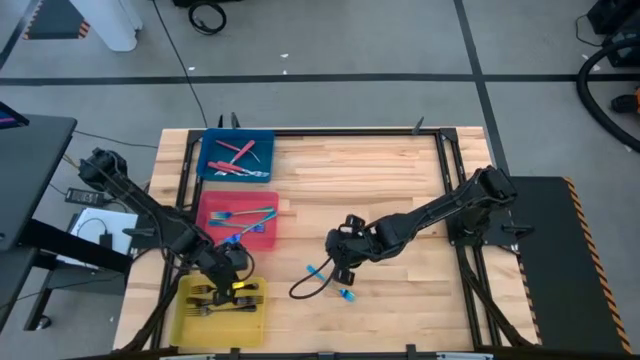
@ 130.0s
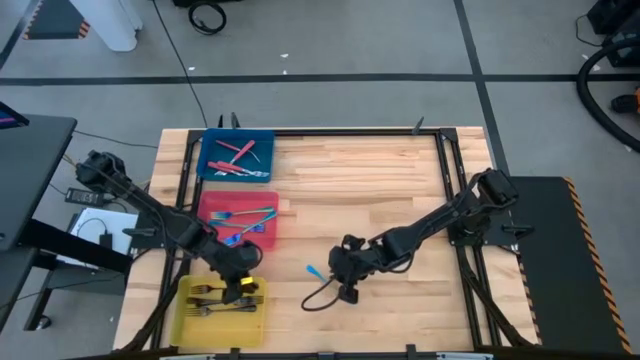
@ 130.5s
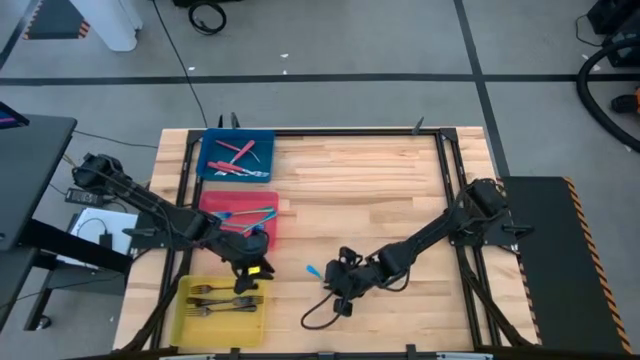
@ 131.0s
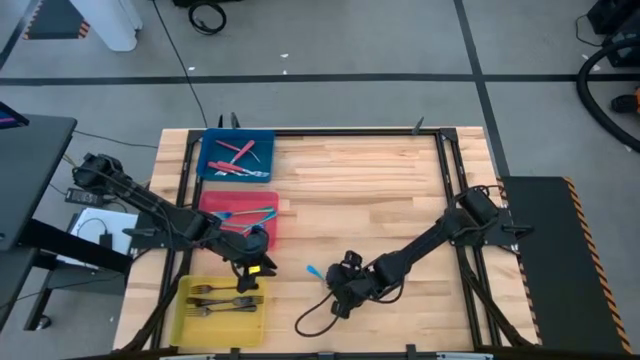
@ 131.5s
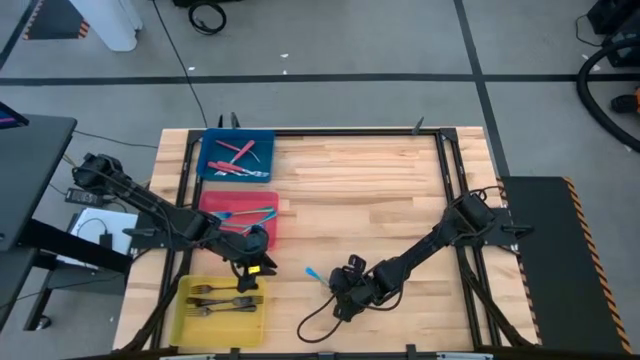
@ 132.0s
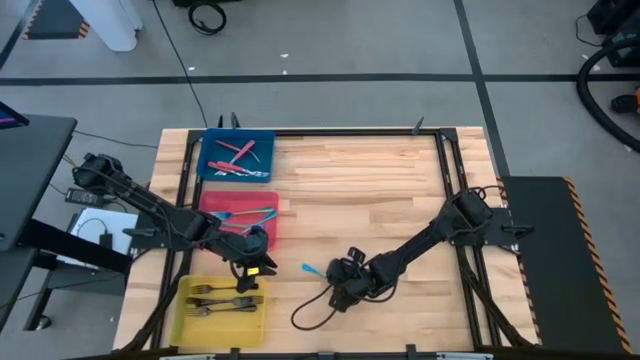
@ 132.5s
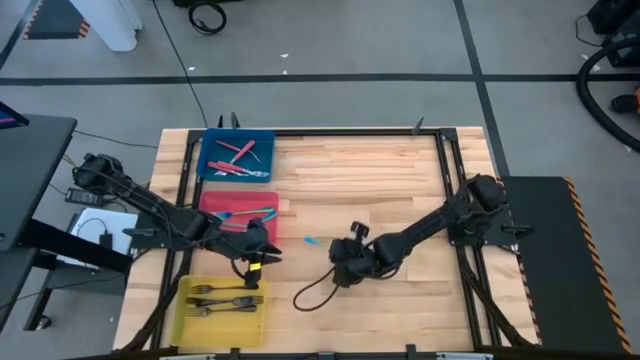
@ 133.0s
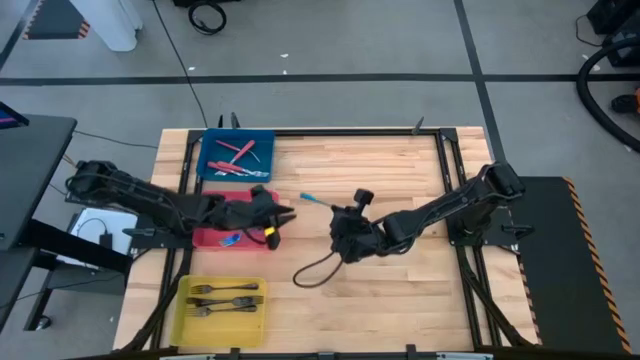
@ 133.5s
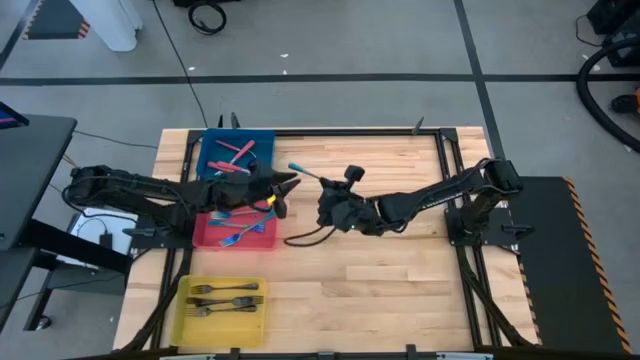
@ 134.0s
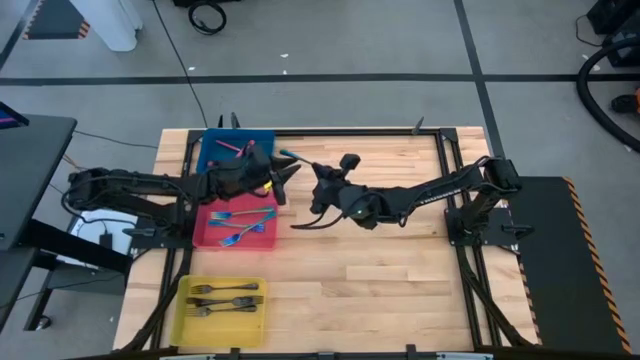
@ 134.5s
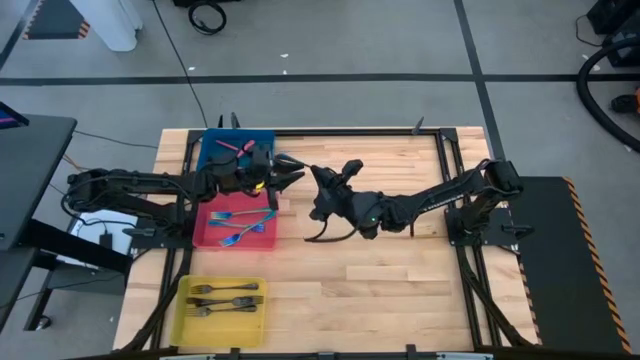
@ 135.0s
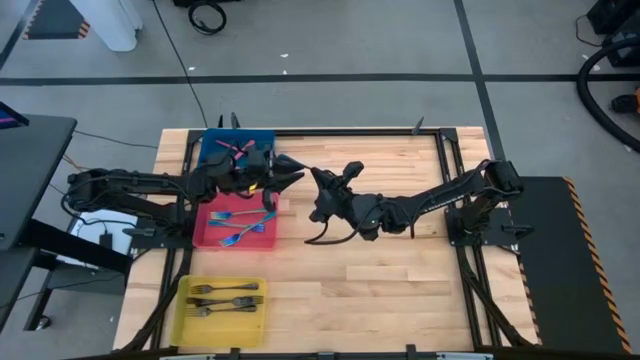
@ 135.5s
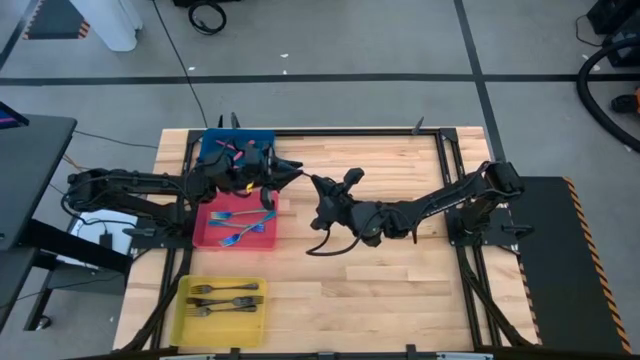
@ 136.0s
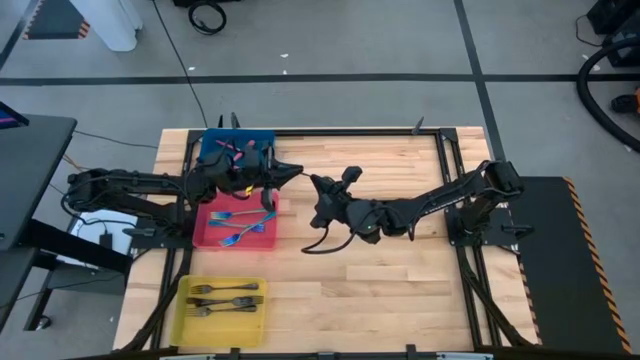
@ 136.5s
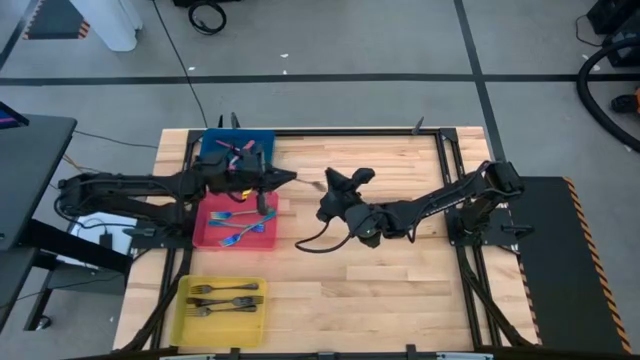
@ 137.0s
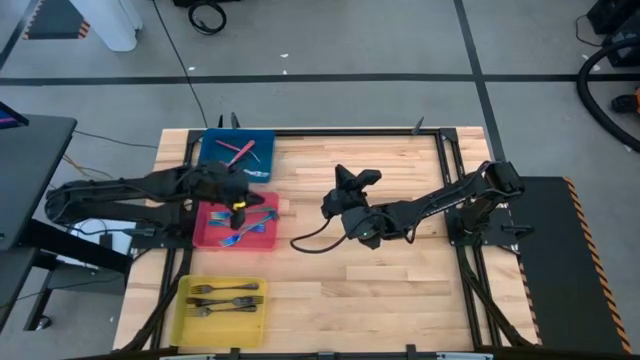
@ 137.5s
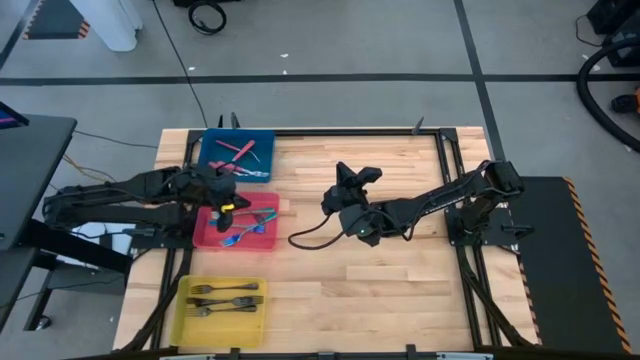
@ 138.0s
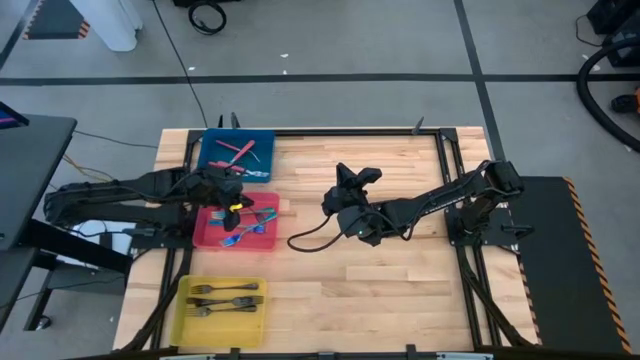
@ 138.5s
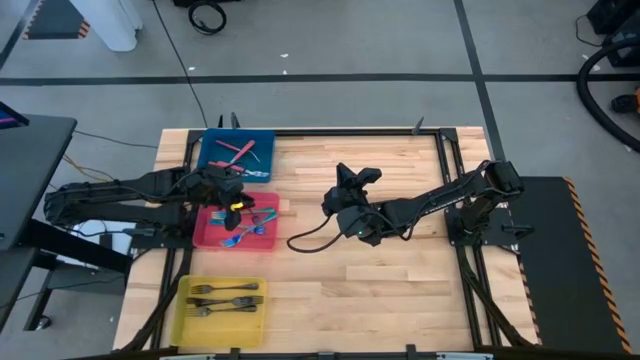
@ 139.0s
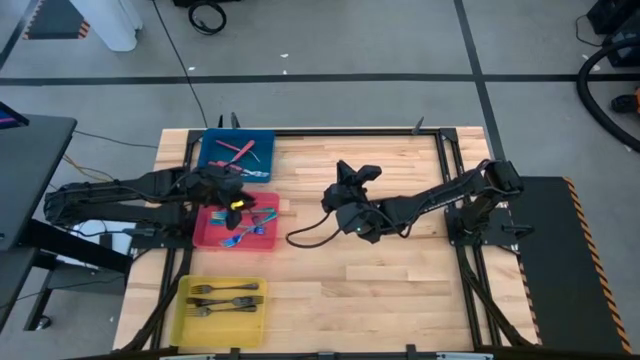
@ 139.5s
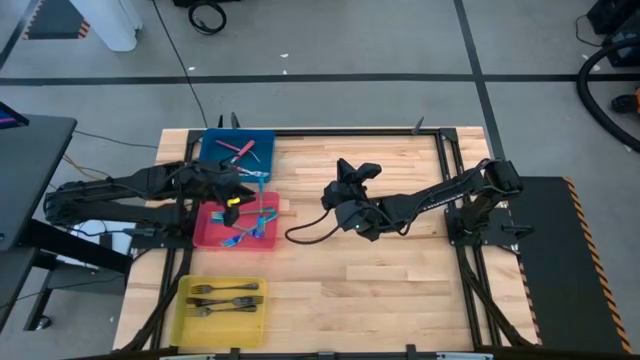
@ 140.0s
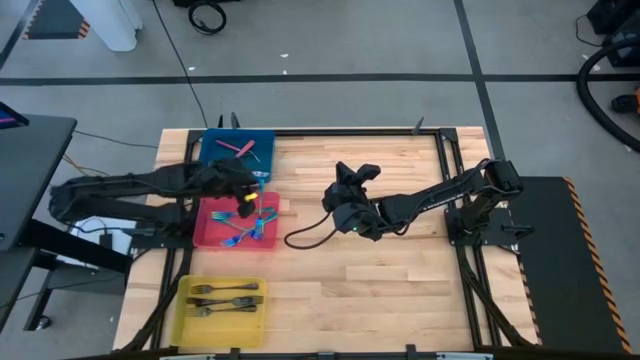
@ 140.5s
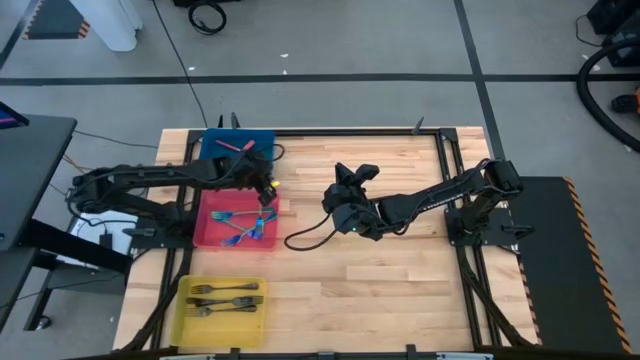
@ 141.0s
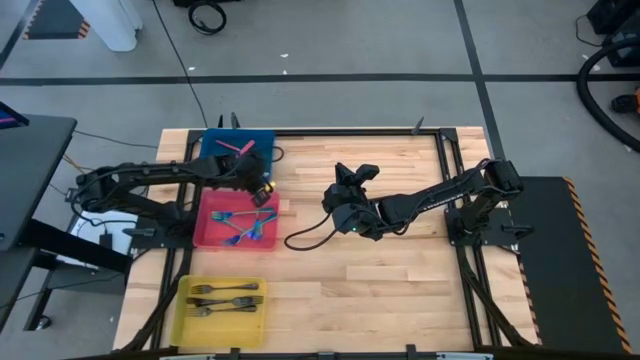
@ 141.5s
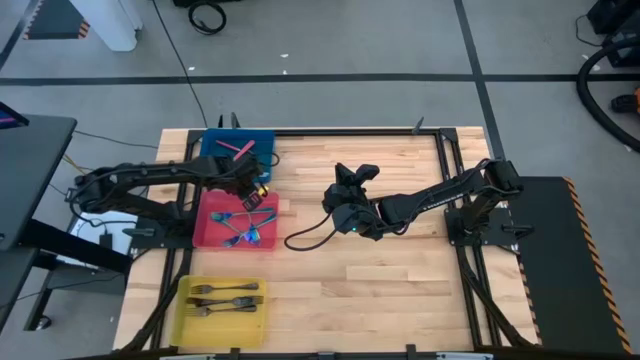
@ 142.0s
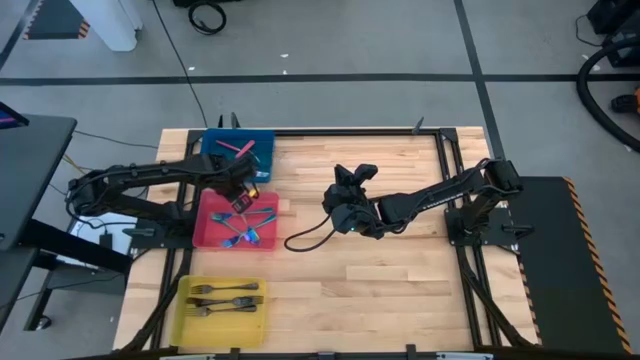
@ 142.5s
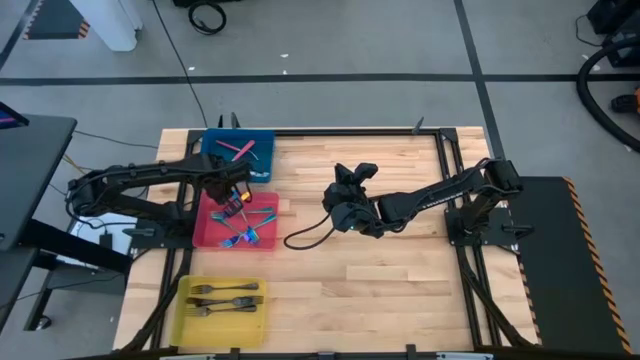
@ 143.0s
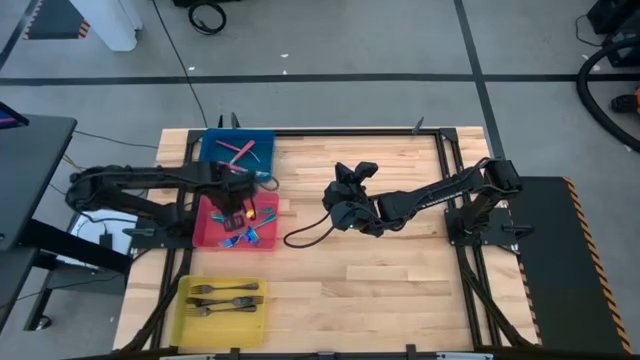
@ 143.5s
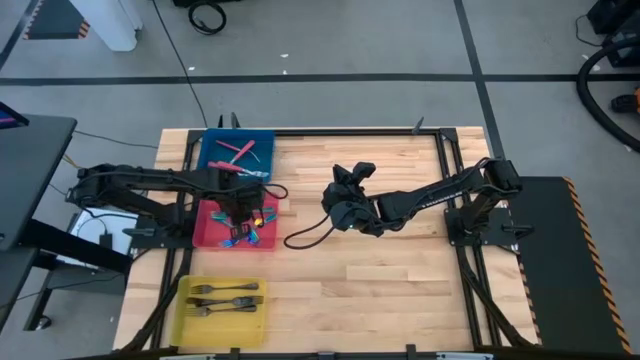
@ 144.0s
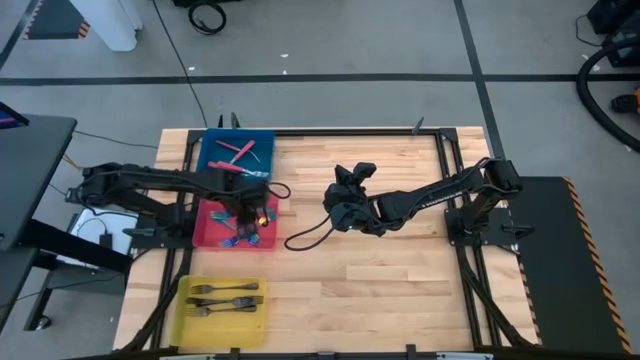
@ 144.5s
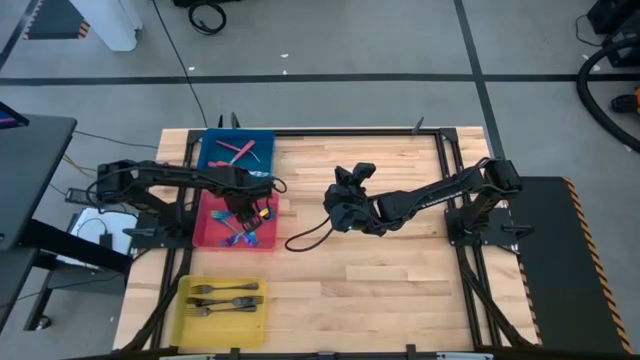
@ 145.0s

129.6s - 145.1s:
Task: Sort silverware by color (type)
Put the light blue fork into the red bin

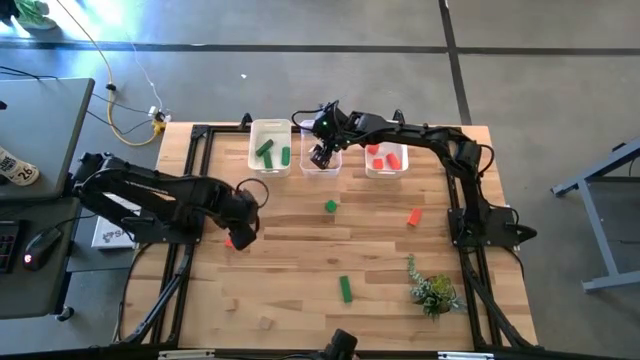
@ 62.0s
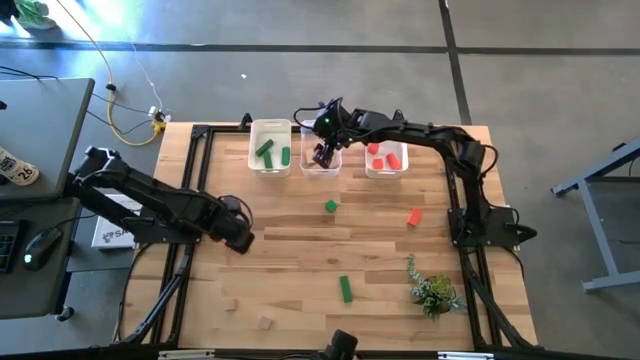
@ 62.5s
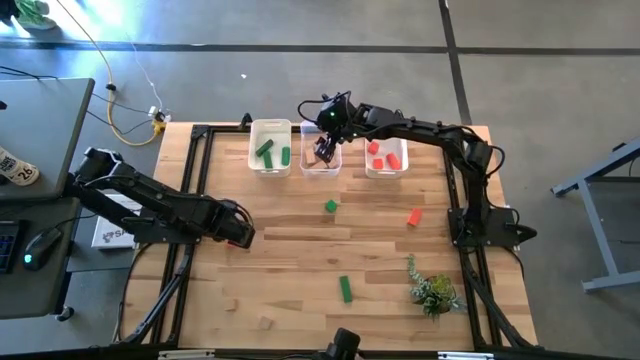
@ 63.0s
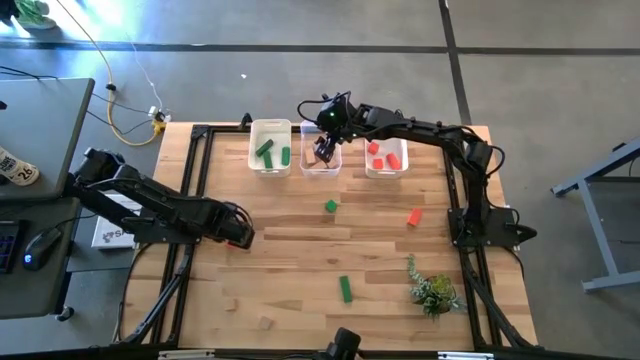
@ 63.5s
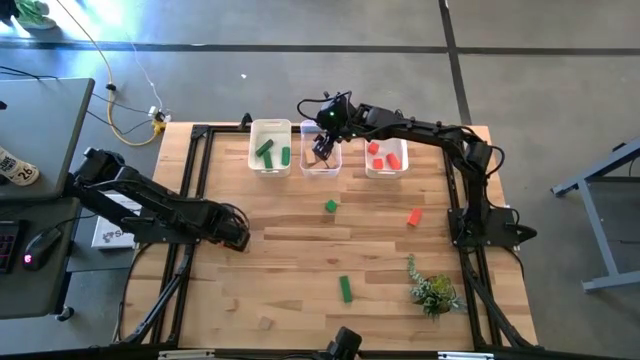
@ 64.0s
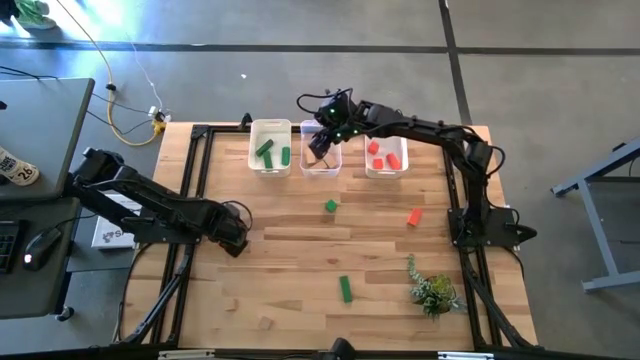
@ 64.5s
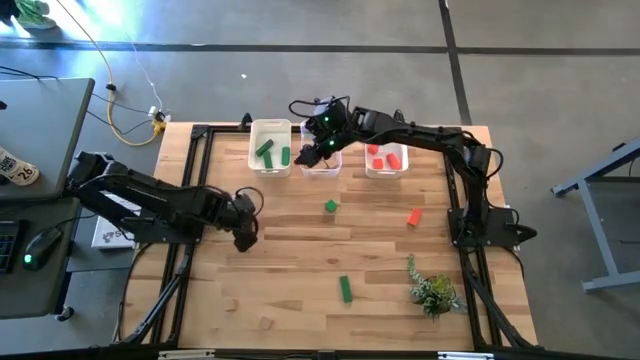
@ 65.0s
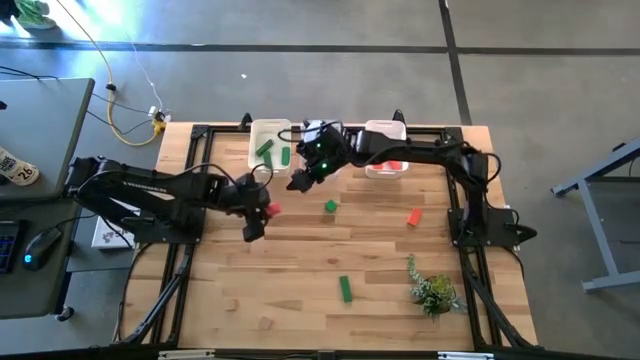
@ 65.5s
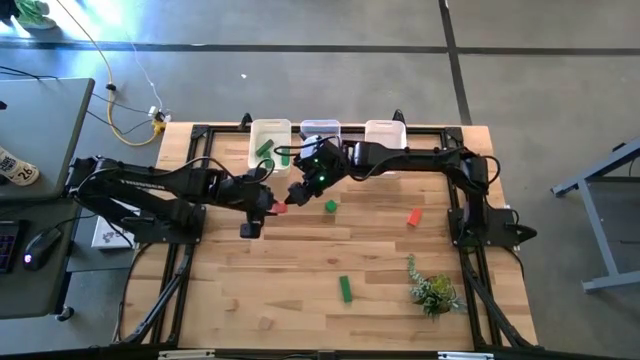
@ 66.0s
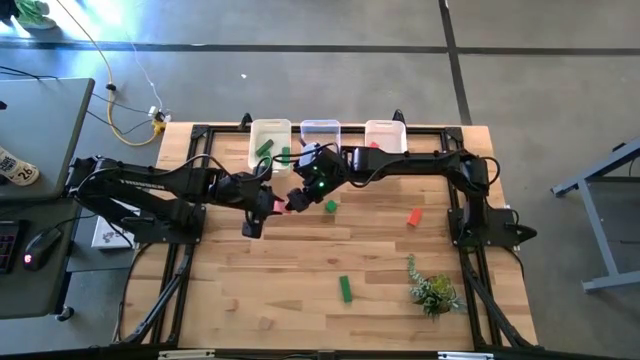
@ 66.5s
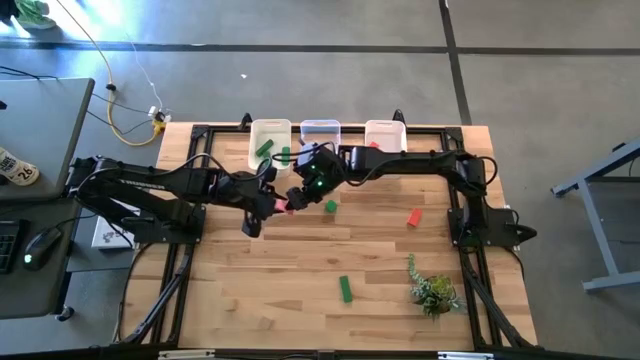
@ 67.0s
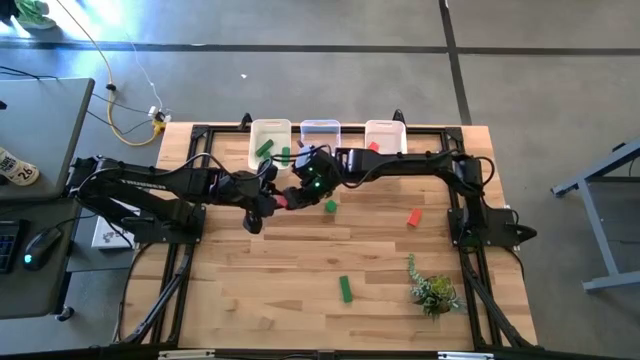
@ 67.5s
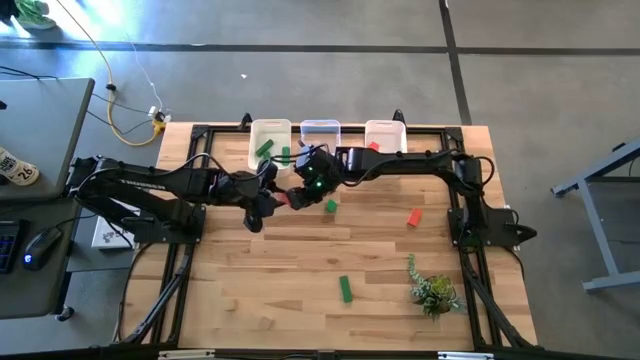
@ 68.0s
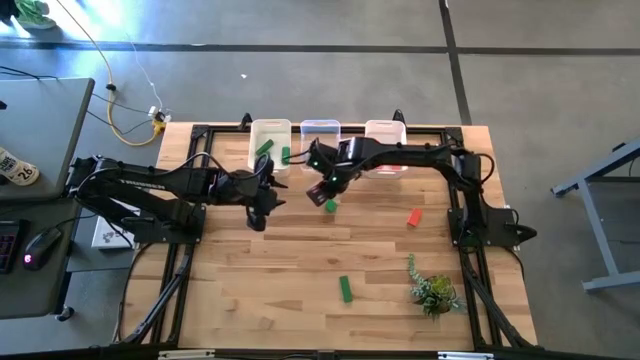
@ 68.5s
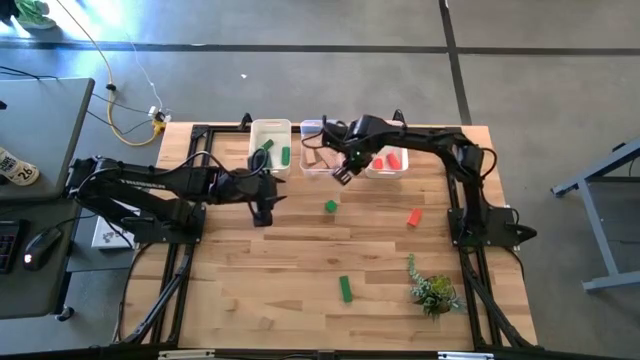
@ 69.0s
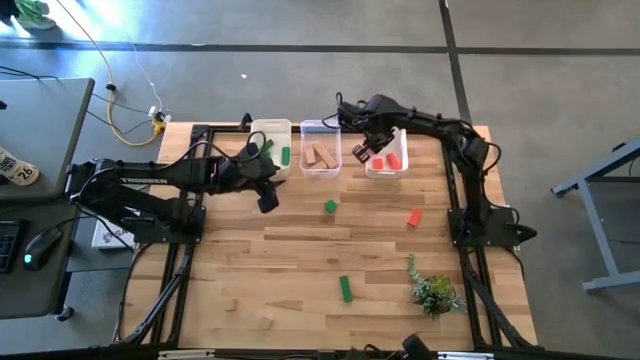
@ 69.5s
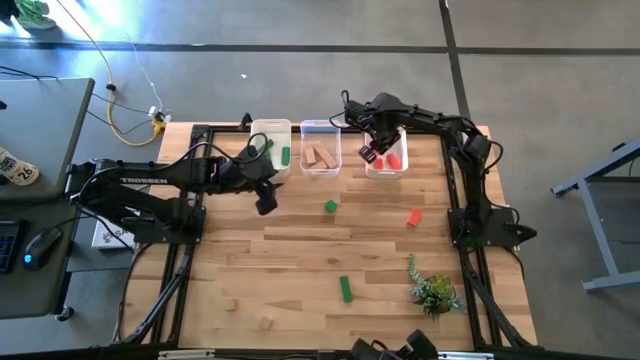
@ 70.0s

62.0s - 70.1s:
Task: Sort & place blocks by color
Put the orange block into the right white bin
